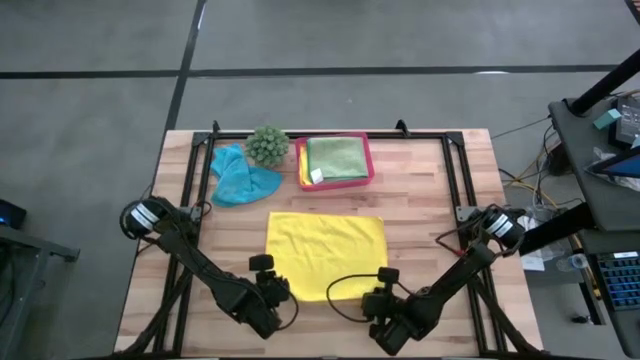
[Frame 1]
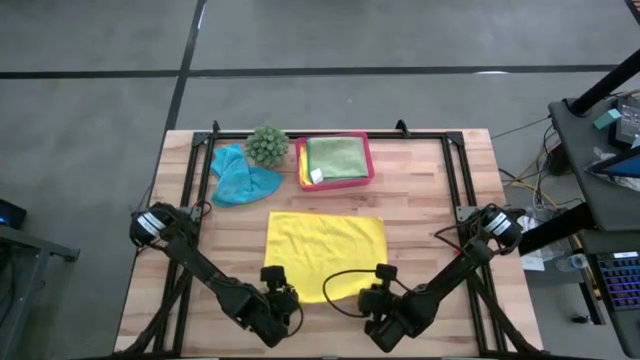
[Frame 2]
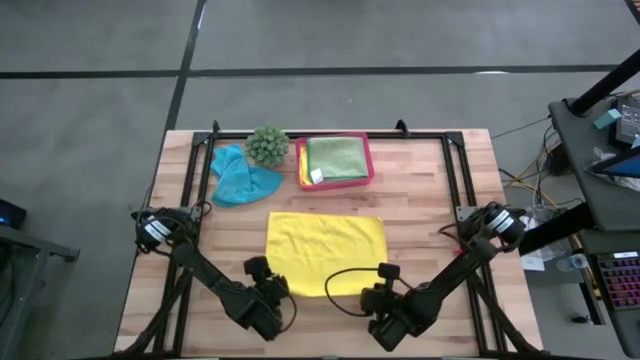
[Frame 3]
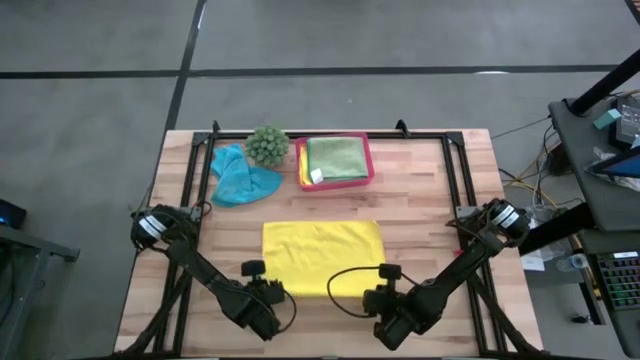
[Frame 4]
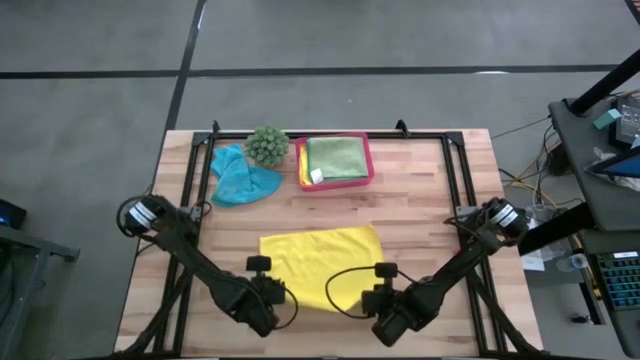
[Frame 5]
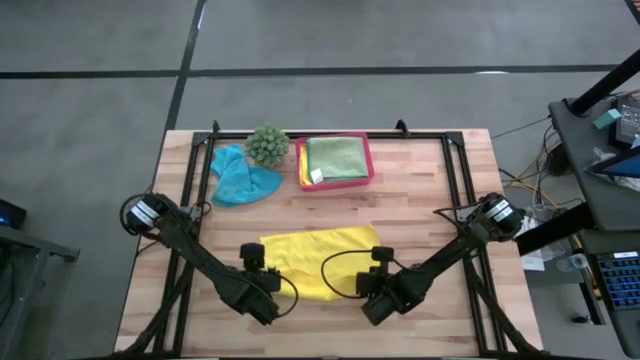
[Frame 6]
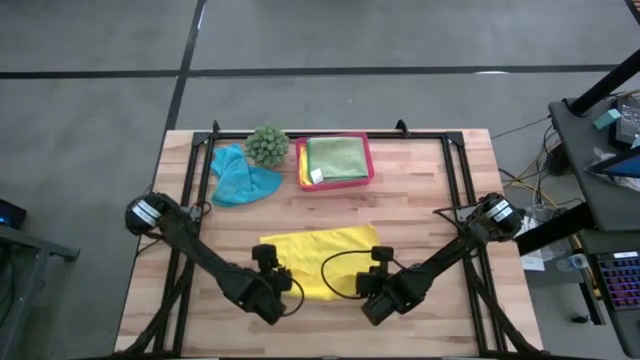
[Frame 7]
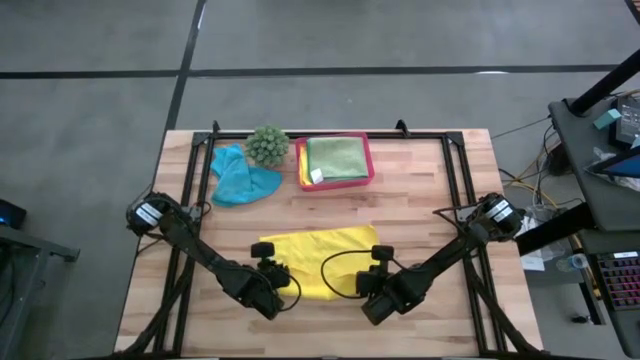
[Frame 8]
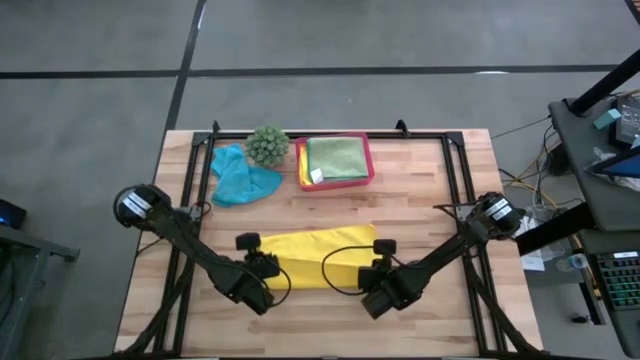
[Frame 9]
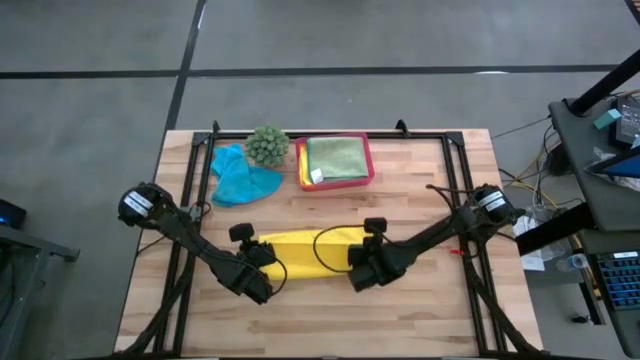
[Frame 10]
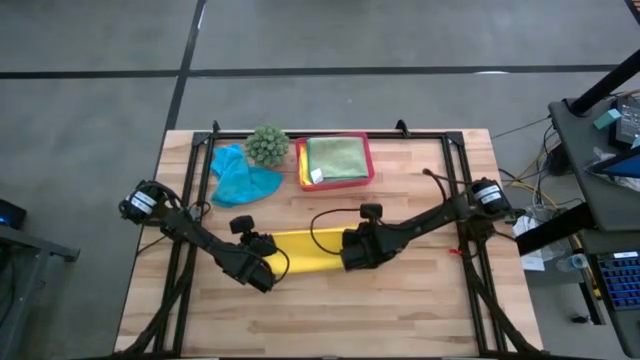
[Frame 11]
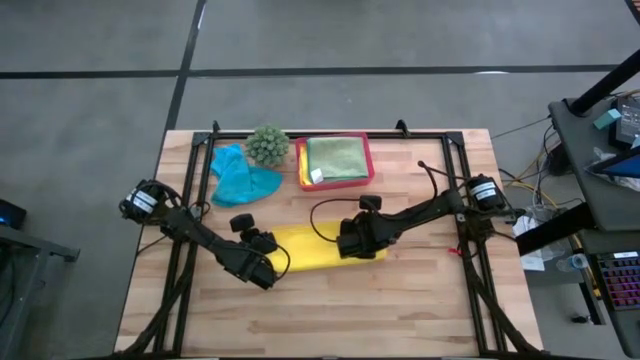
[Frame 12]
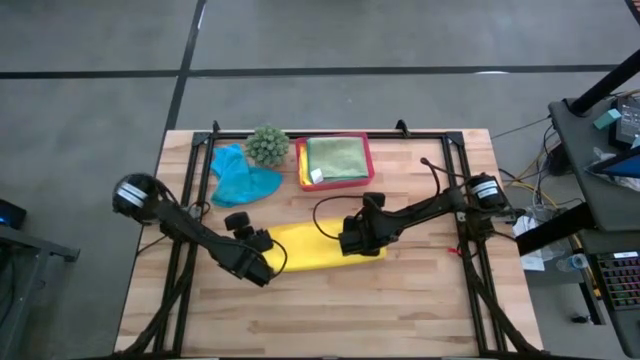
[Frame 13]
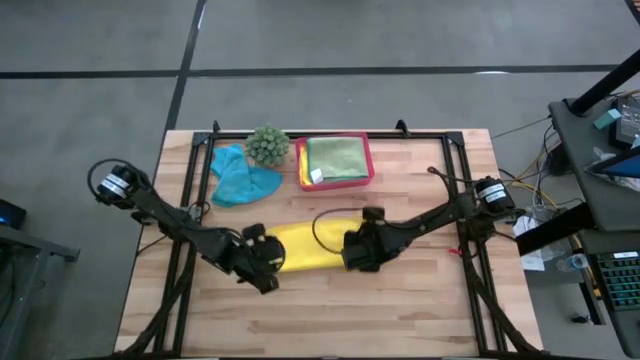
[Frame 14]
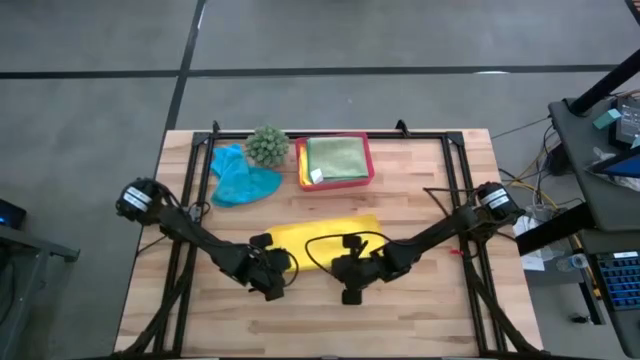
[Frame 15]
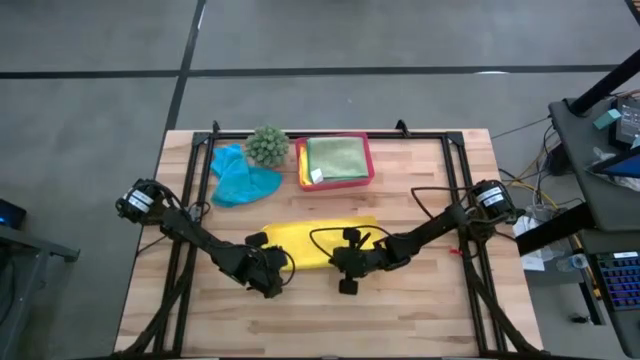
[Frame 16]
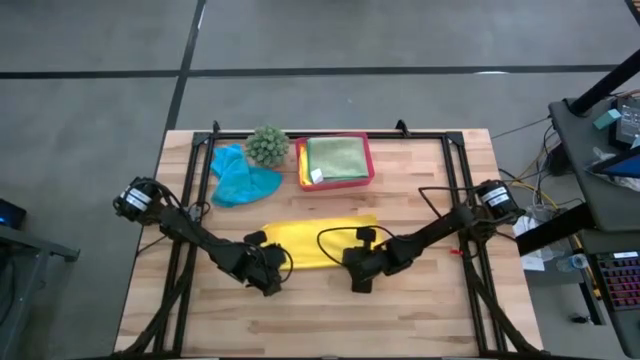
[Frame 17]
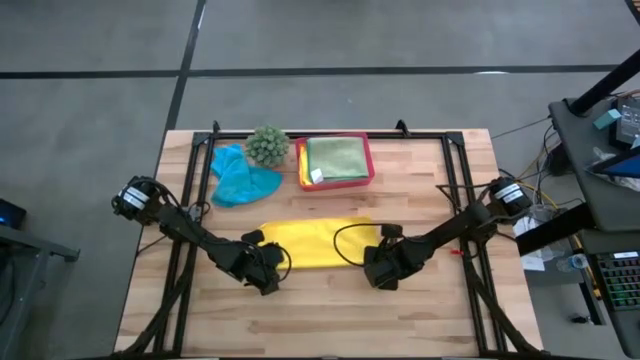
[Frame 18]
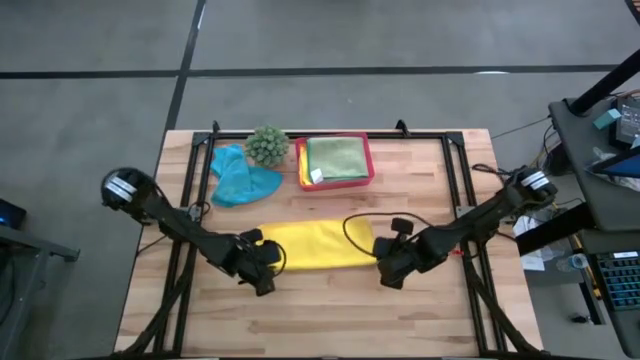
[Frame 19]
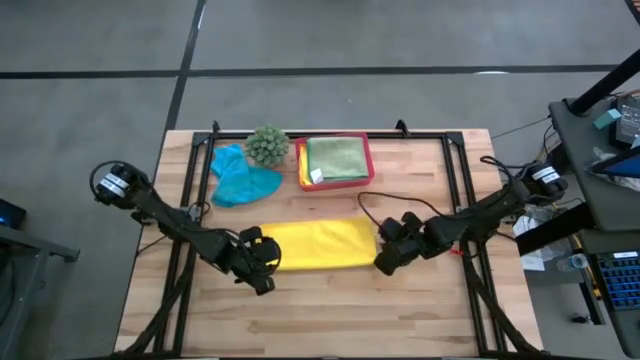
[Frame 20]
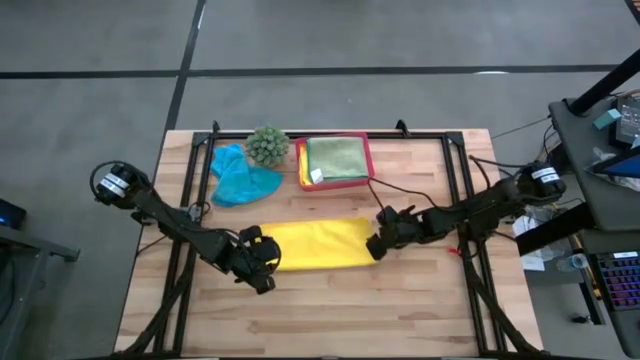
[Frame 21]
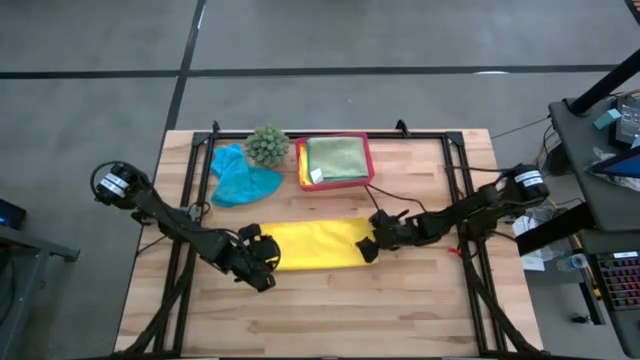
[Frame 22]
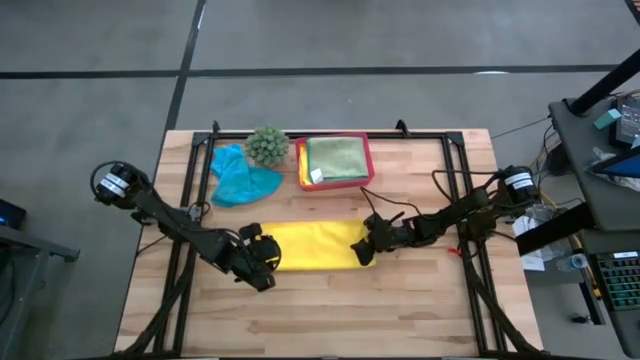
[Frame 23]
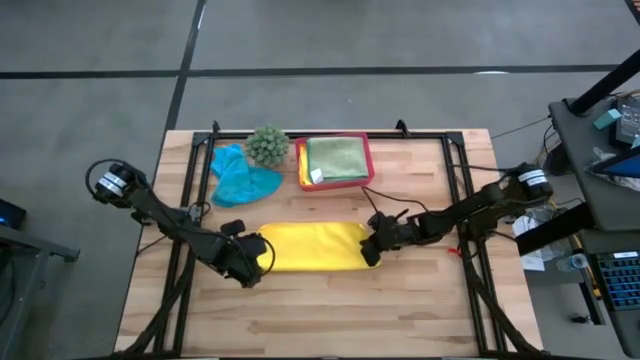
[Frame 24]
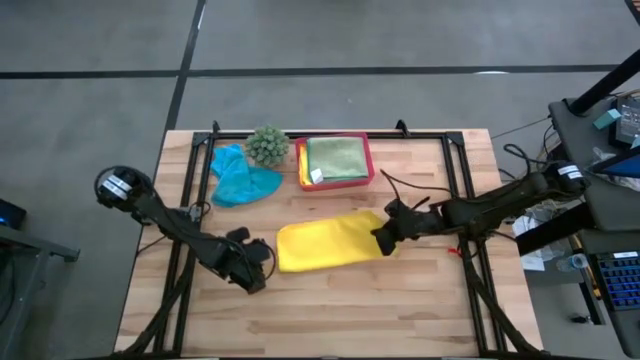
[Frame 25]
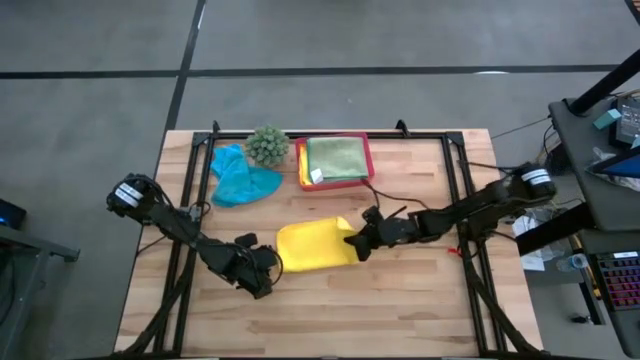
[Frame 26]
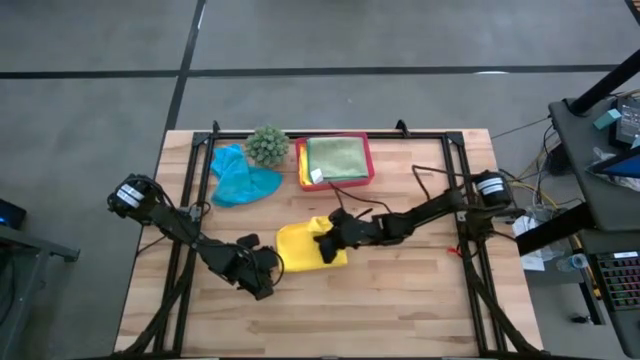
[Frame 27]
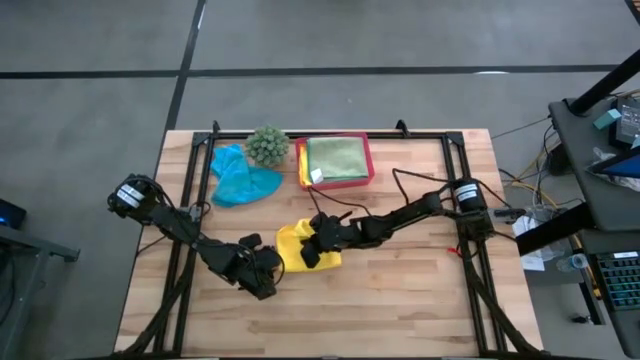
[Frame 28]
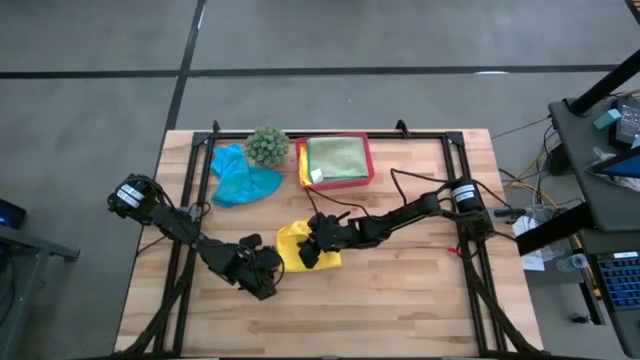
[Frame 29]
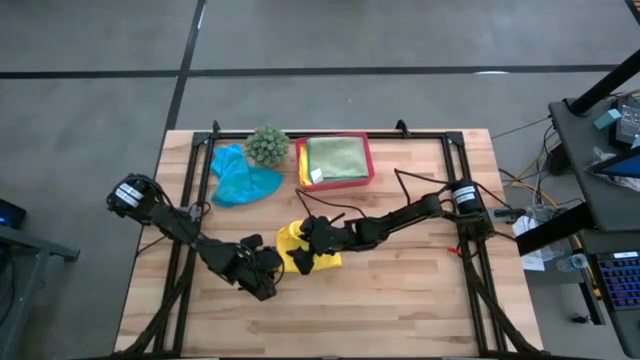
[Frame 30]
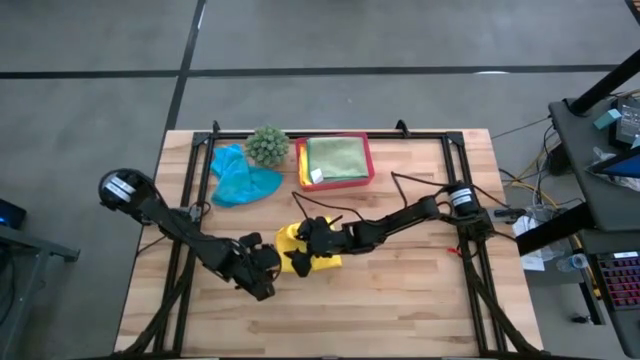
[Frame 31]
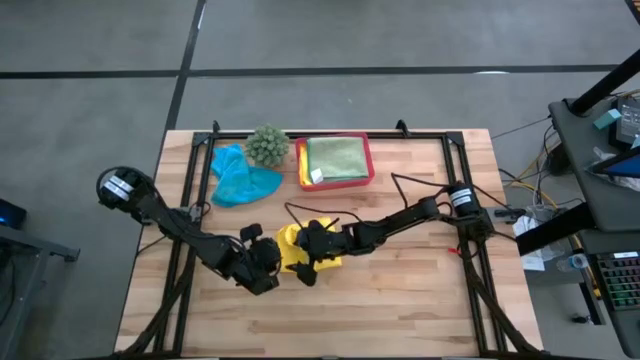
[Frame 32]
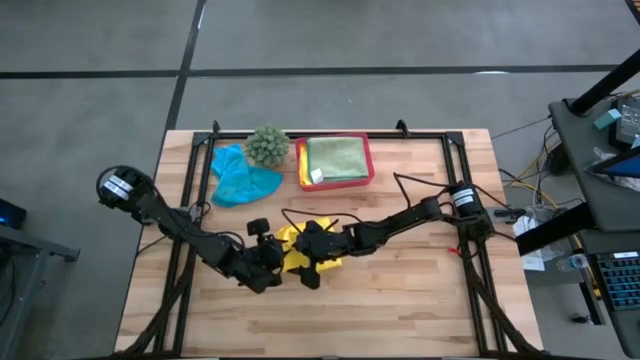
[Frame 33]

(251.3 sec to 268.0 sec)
Task: Fold microfiber towels
Fold the yellow microfiber towel

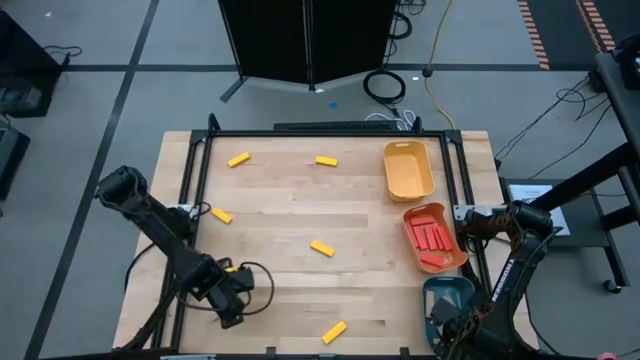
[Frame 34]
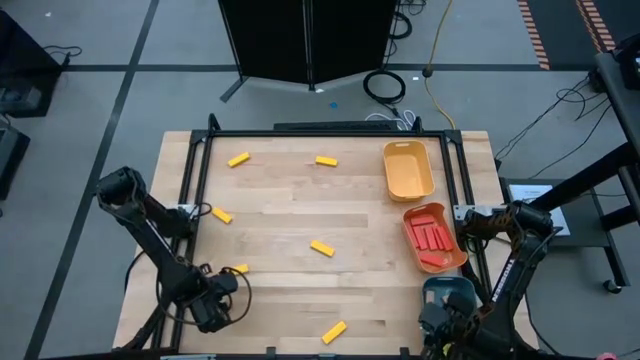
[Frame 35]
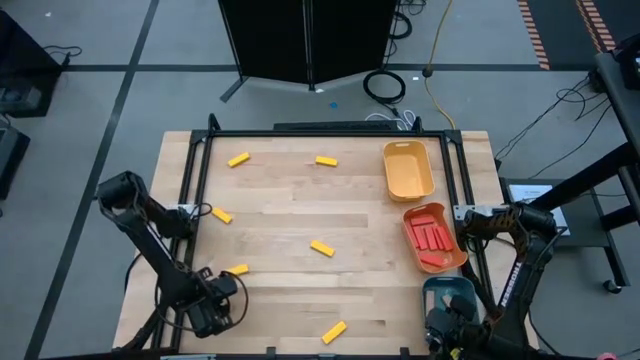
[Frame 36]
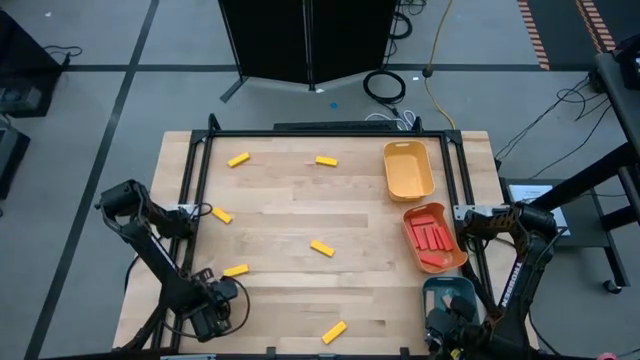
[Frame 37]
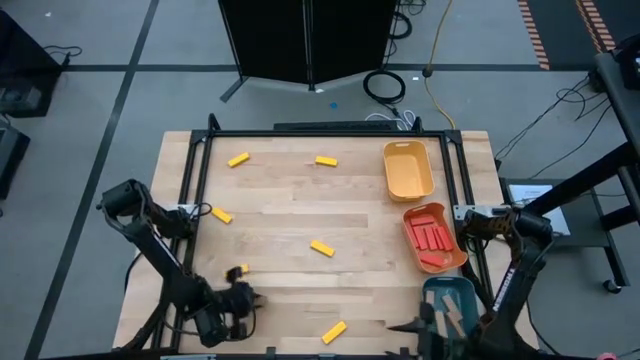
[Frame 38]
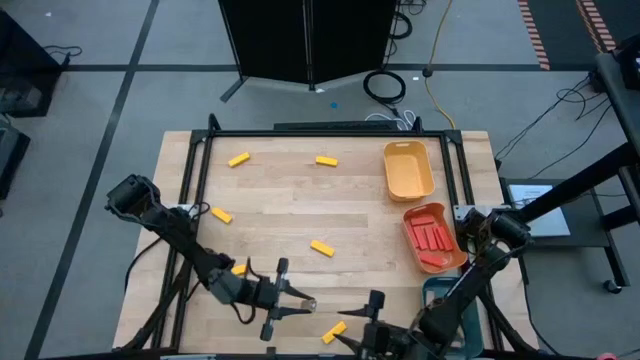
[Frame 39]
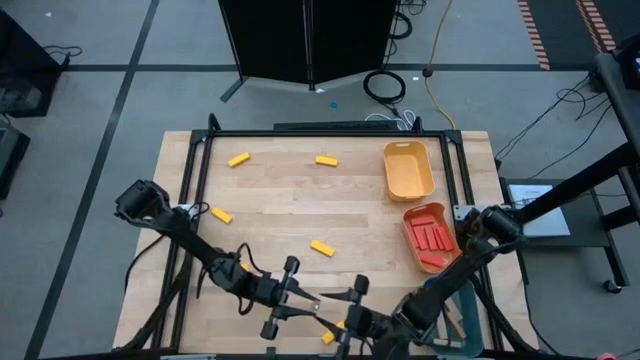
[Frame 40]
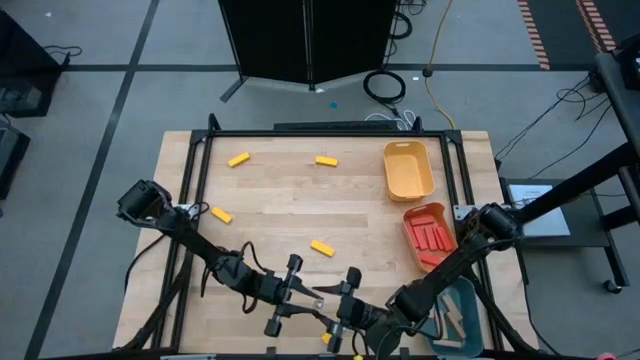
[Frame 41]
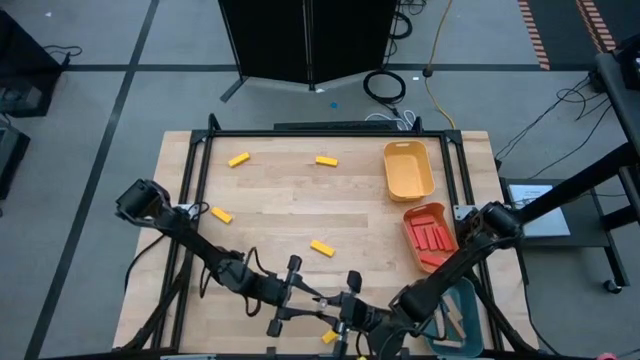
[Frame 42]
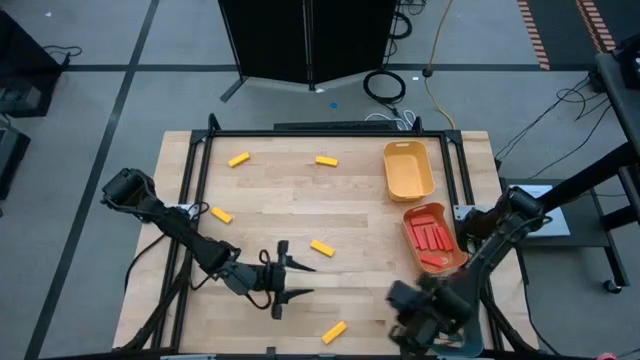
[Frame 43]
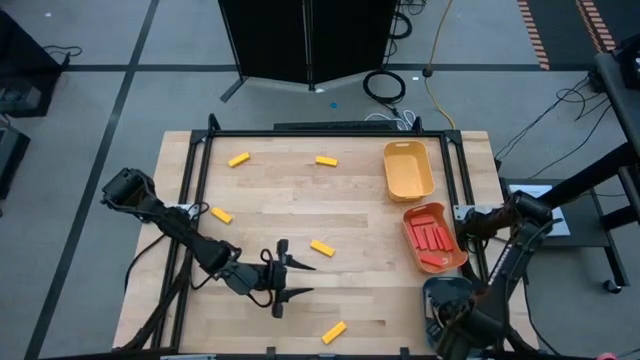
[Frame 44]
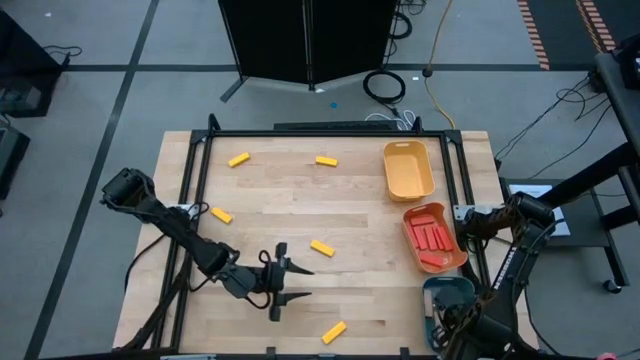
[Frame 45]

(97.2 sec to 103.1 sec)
Task: Sort blocks
Put the brown block into the blue bin
